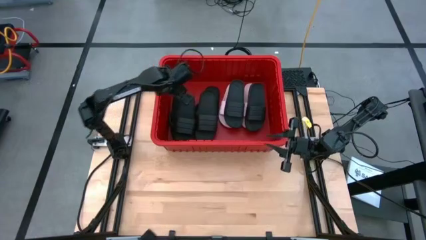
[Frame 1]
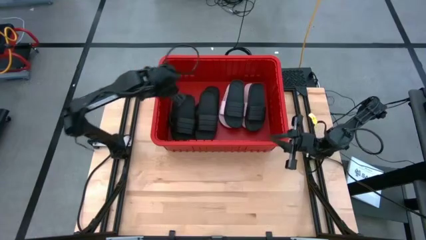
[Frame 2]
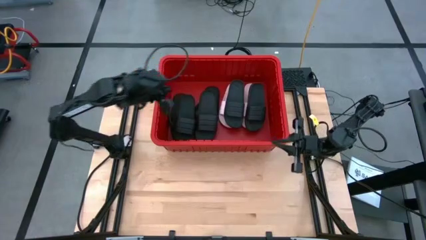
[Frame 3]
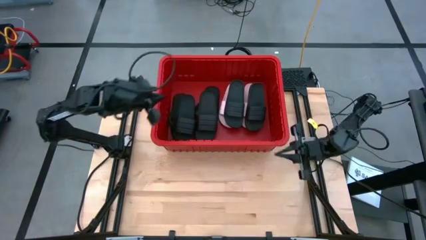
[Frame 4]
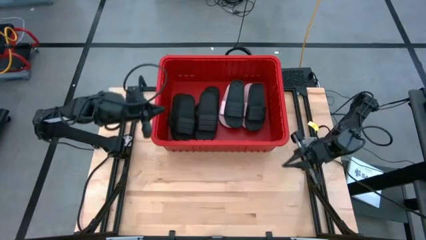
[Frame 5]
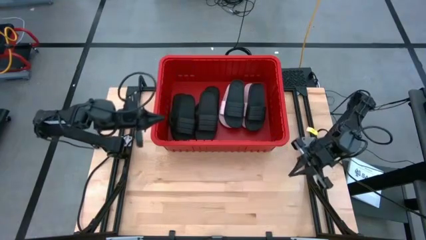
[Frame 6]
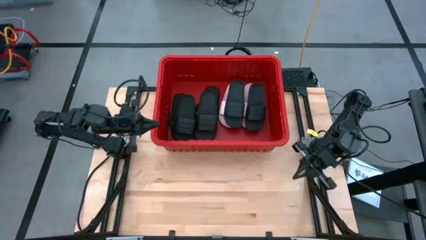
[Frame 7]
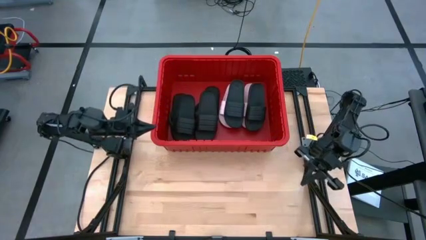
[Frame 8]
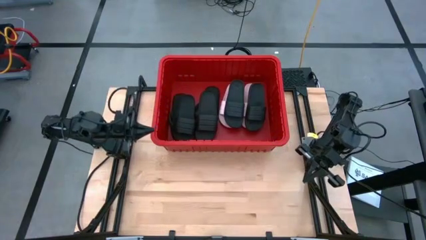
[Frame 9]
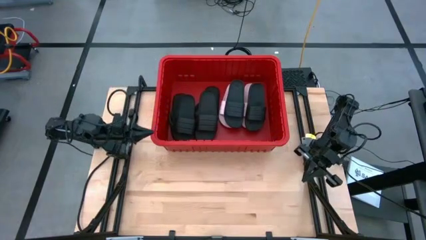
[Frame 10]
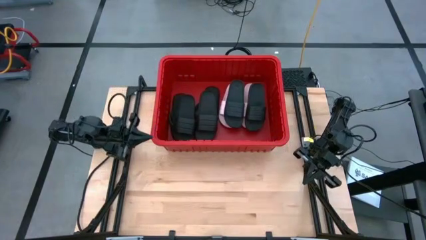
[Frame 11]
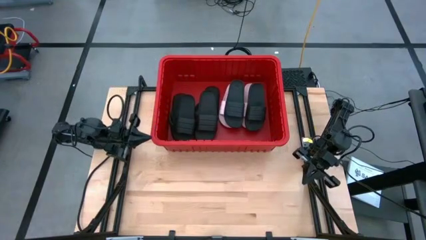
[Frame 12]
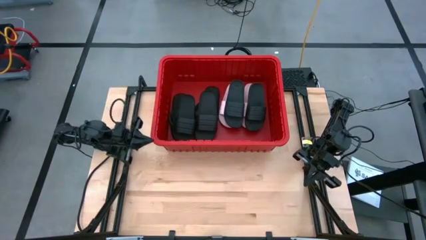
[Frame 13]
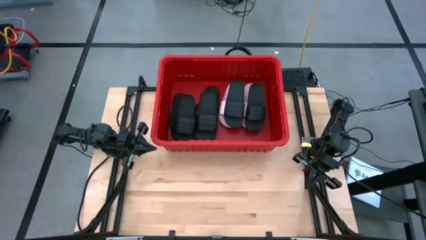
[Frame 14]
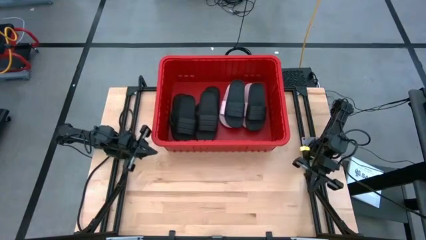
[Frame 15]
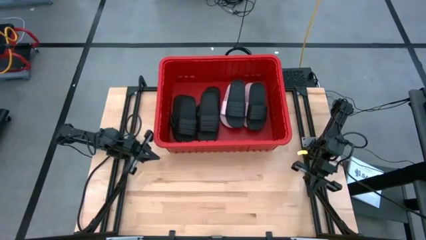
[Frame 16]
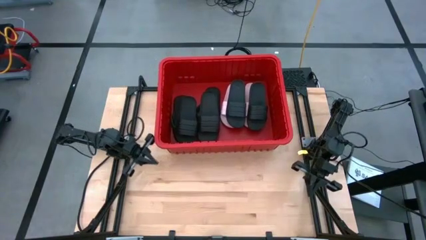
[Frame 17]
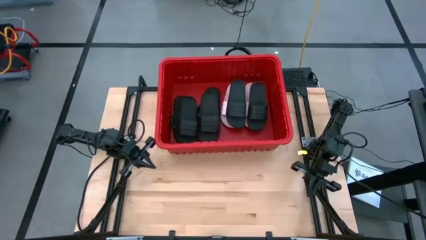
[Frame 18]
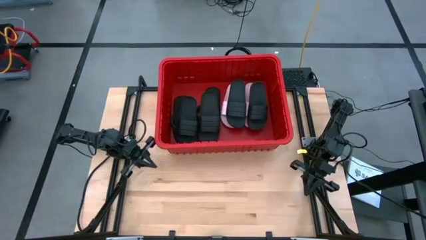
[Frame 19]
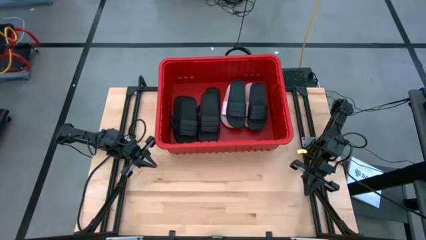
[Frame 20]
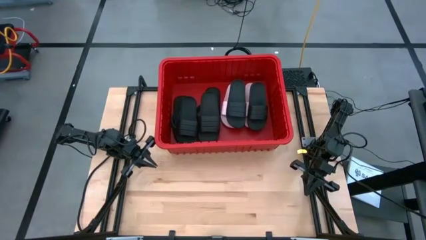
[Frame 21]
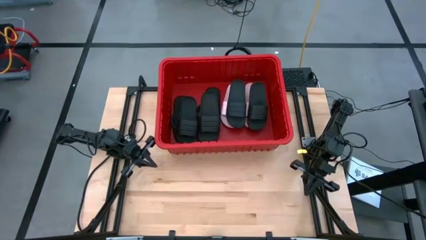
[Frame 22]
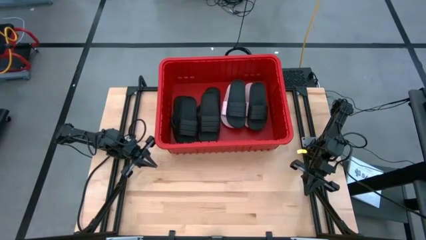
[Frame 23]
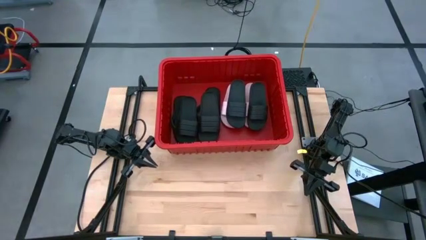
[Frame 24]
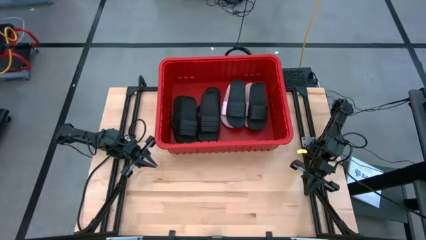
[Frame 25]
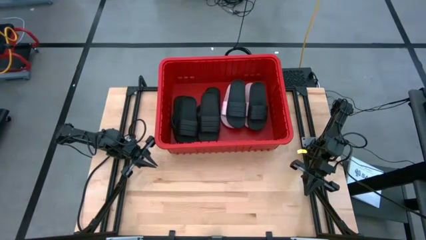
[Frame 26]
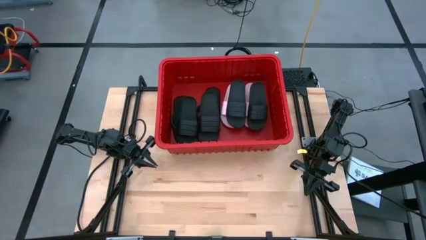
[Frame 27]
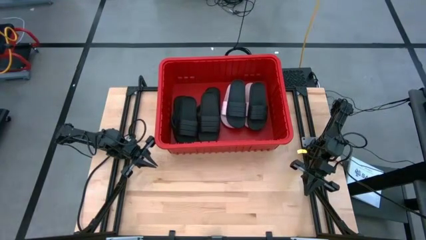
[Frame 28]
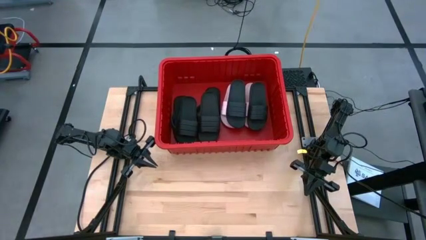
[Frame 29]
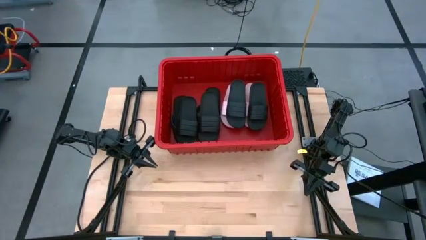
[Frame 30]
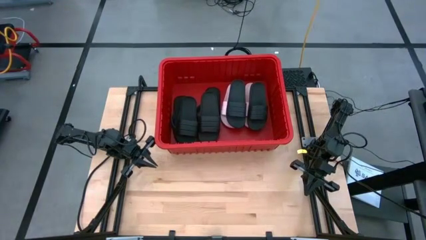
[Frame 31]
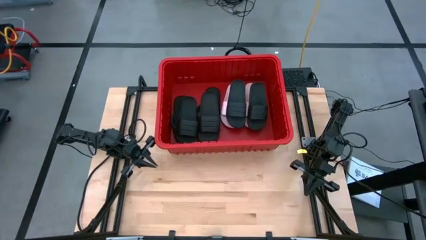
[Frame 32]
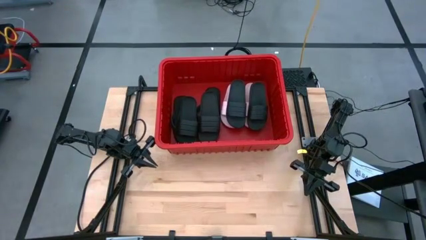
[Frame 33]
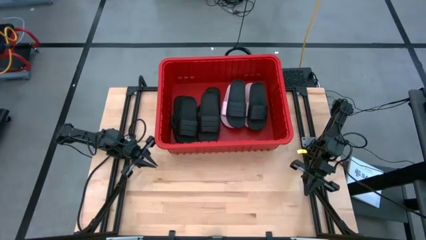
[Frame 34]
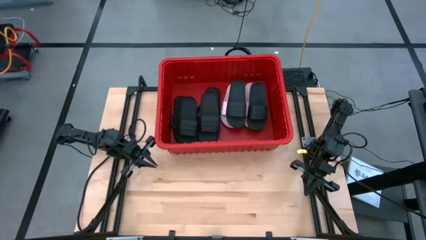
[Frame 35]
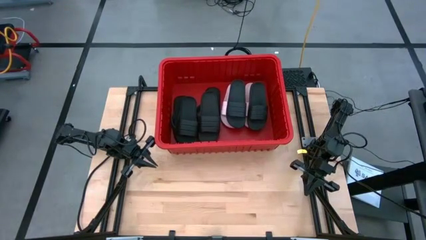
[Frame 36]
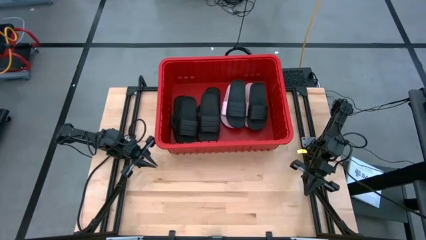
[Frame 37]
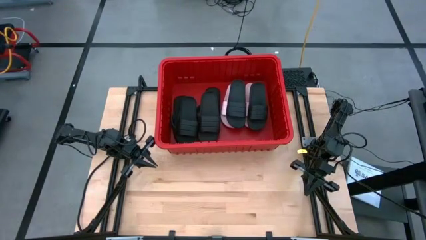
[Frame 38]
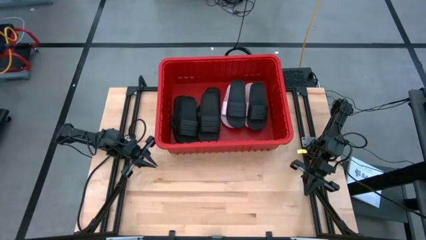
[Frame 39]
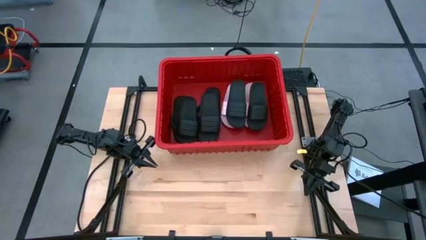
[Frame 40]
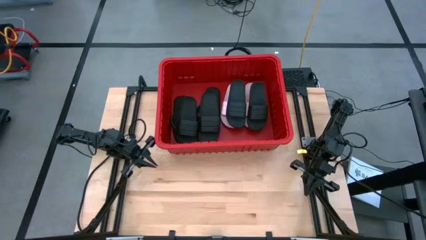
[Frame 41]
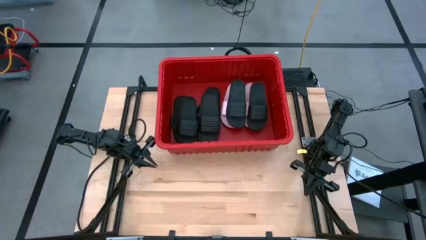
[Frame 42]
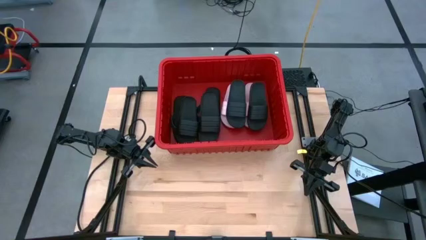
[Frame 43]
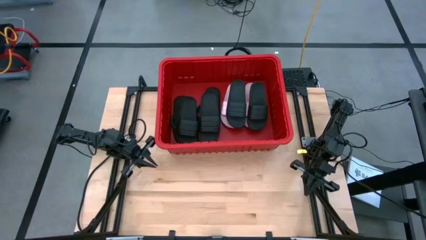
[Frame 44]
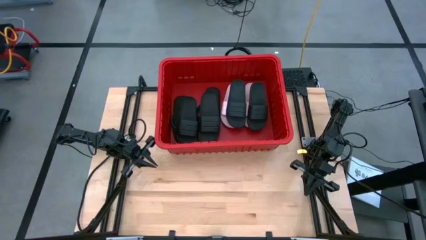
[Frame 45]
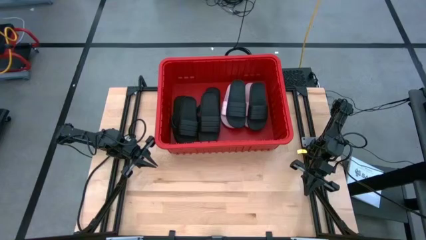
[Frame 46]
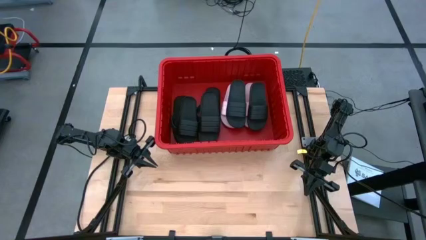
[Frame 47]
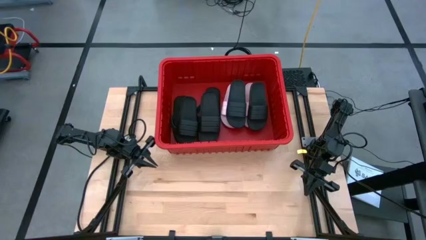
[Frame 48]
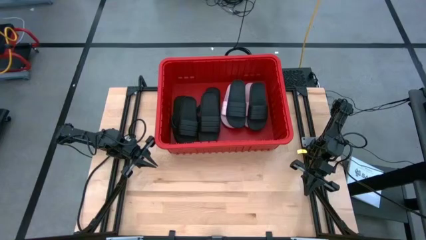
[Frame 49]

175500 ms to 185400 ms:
Task: Pick and place slides into bin
Return to Home Position

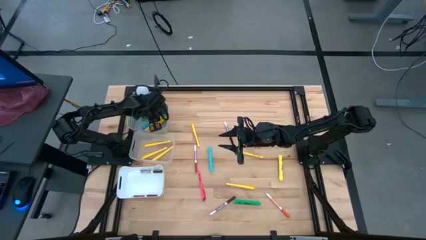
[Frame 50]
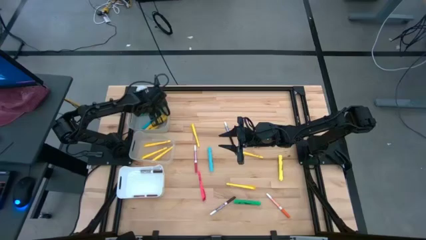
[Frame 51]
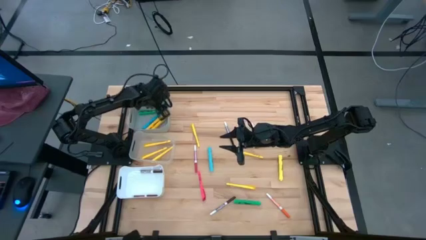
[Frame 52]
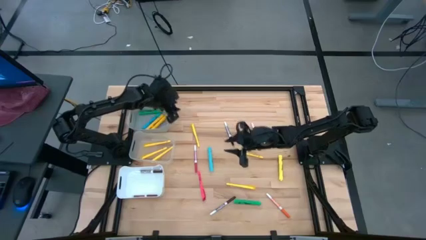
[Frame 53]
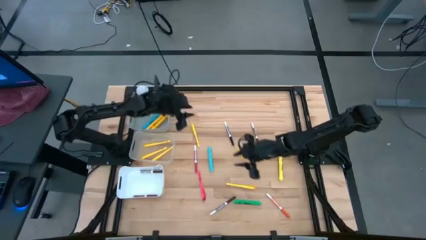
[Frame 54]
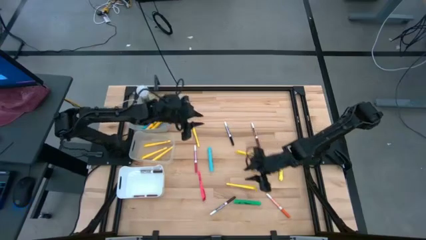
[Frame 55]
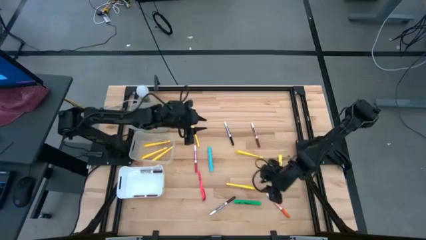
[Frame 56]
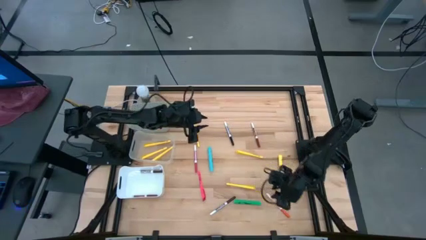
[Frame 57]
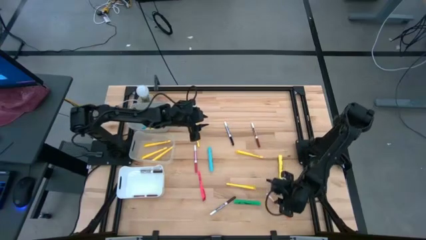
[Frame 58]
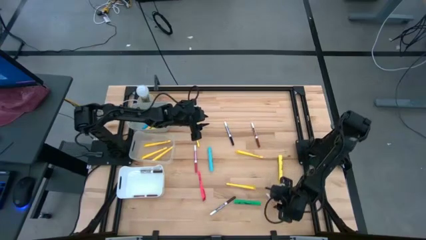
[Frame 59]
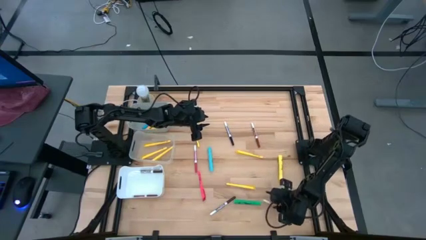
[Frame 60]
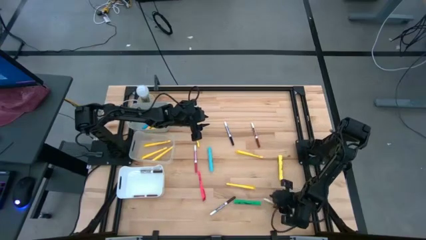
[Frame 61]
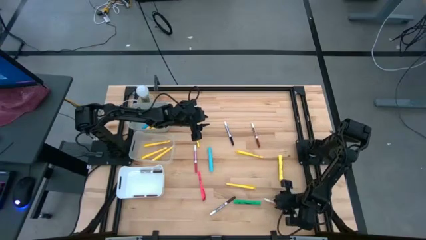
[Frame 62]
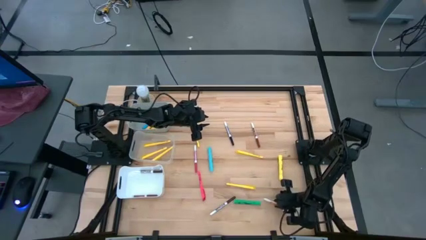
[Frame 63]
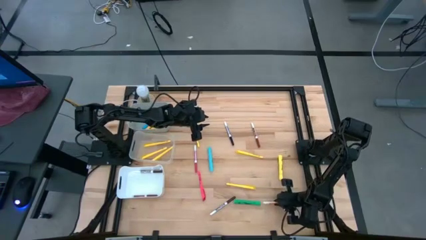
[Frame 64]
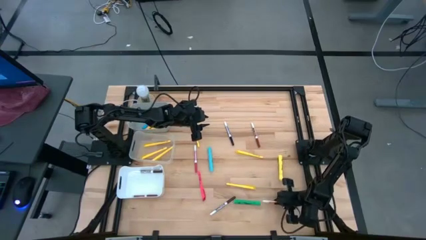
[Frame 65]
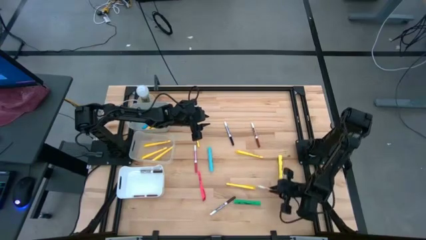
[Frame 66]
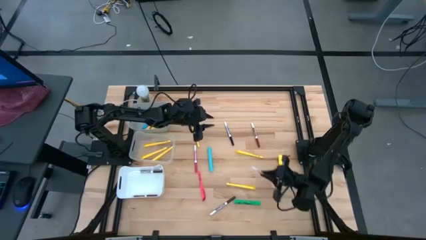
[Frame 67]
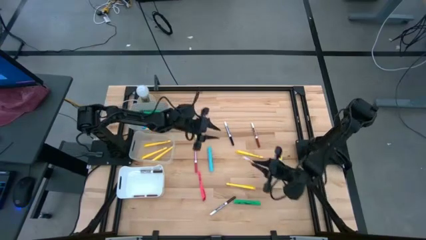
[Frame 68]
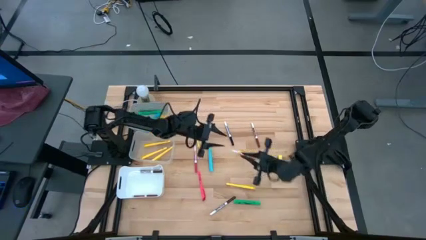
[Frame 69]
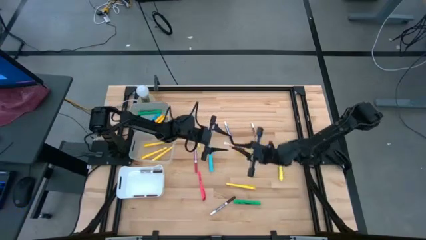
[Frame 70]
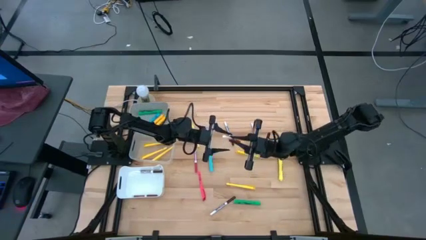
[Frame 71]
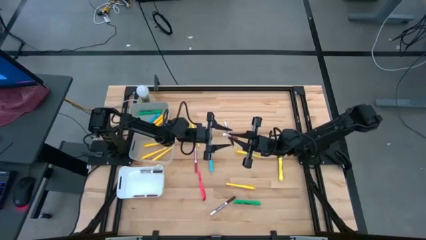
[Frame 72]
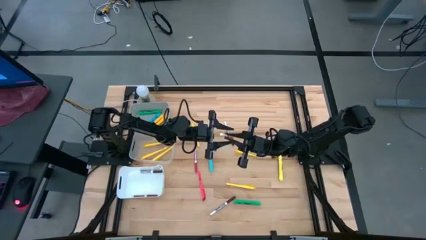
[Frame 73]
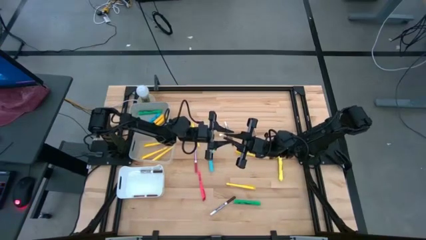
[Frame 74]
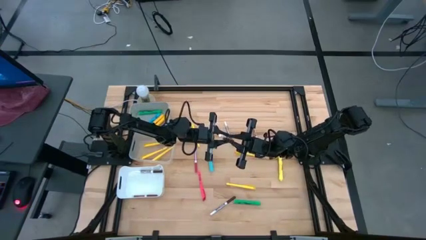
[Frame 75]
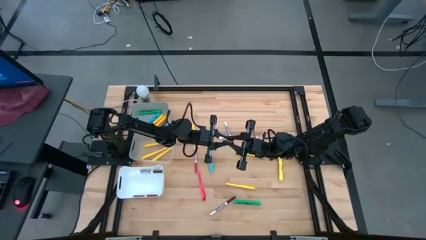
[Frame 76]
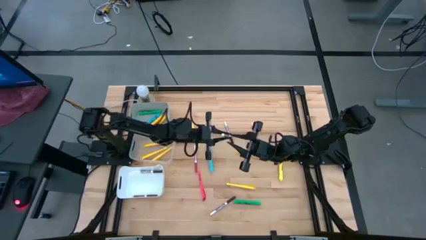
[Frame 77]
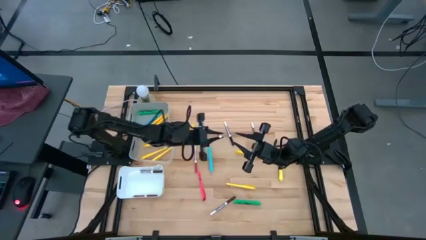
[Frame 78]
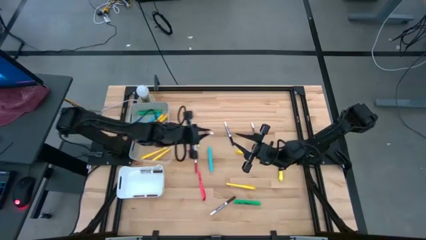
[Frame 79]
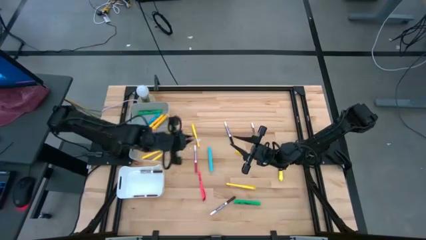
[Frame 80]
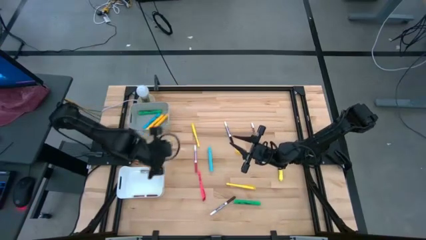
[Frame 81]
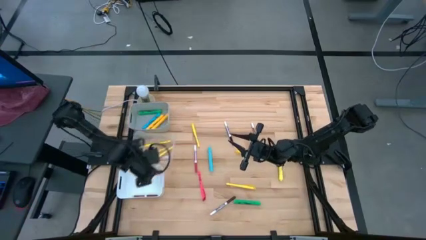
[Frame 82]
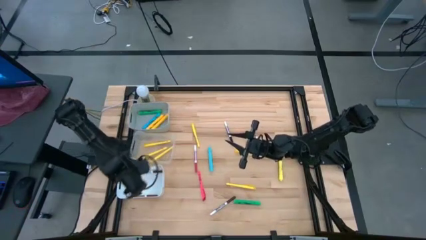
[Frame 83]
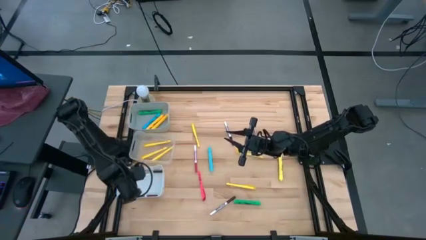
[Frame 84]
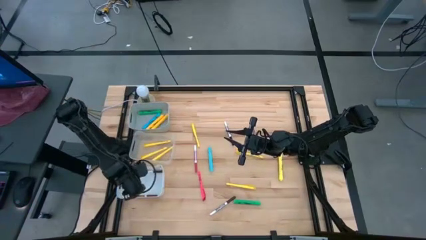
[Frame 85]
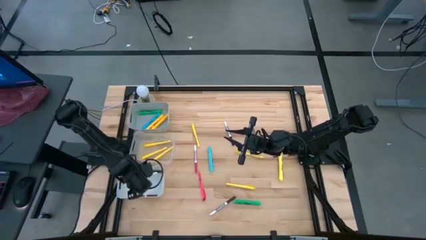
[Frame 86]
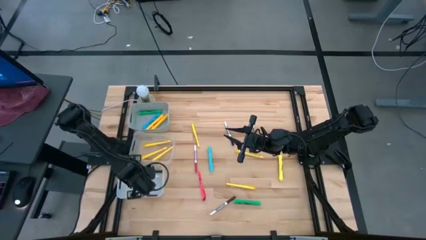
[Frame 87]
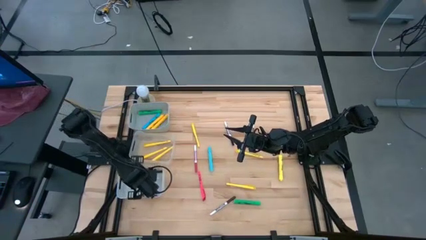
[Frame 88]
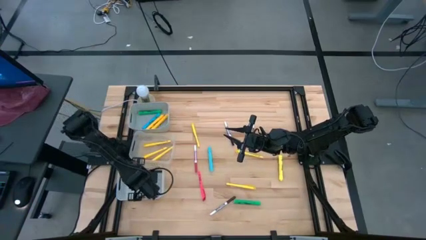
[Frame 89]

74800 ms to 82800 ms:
Task: Pick & Place Markers
Put the orange marker into the white bin
